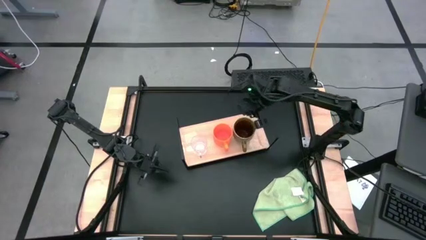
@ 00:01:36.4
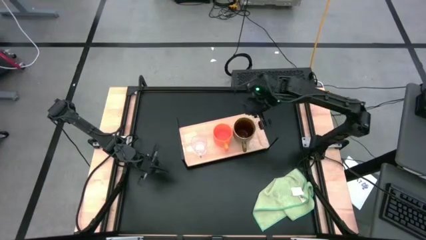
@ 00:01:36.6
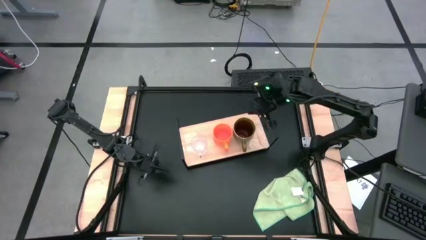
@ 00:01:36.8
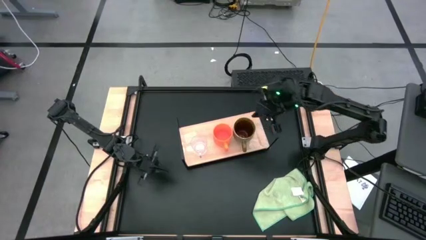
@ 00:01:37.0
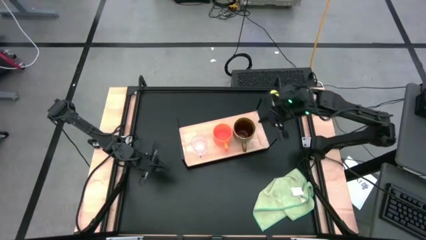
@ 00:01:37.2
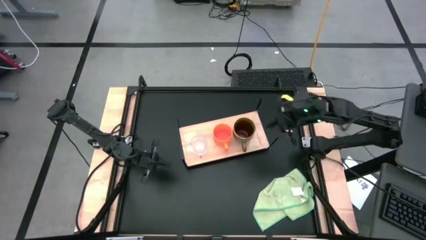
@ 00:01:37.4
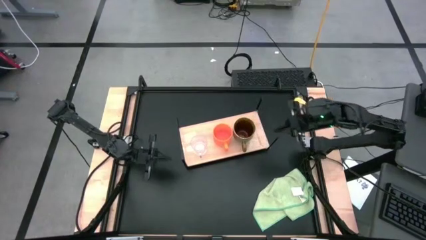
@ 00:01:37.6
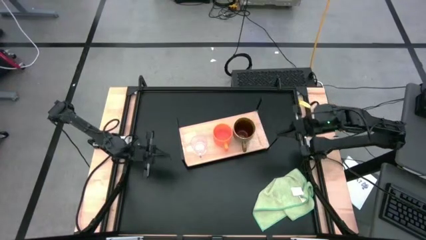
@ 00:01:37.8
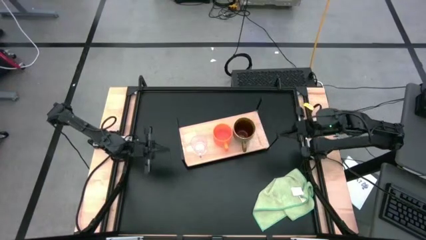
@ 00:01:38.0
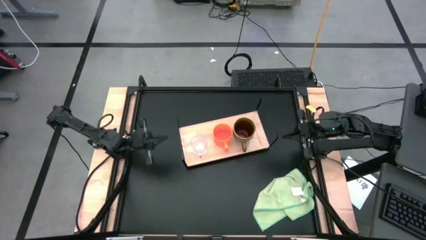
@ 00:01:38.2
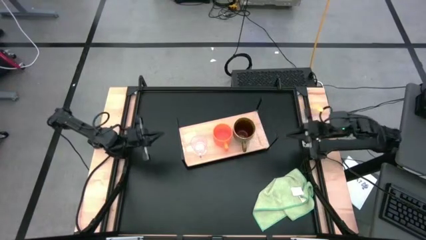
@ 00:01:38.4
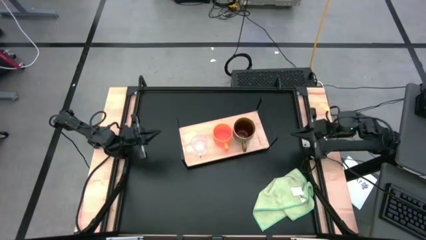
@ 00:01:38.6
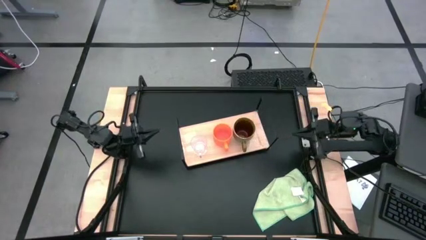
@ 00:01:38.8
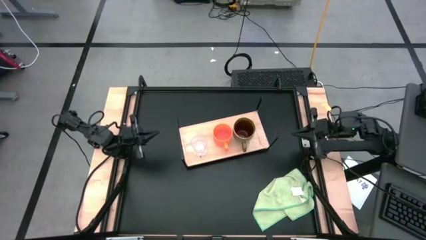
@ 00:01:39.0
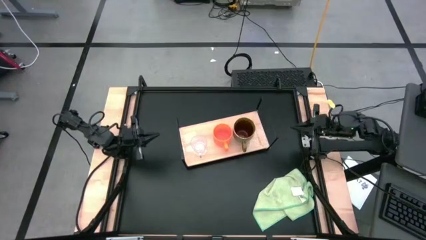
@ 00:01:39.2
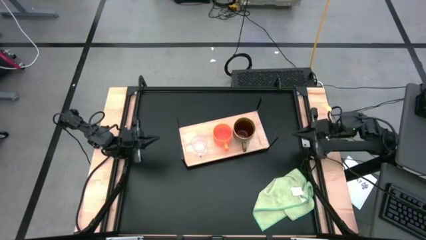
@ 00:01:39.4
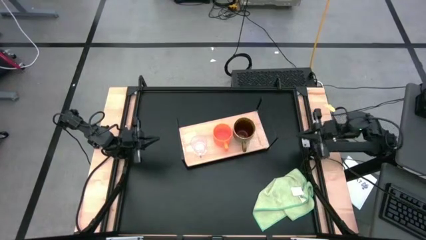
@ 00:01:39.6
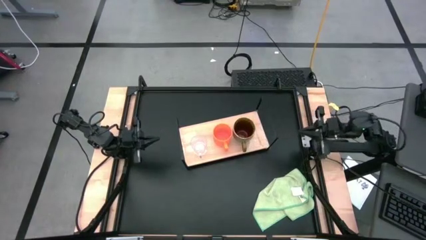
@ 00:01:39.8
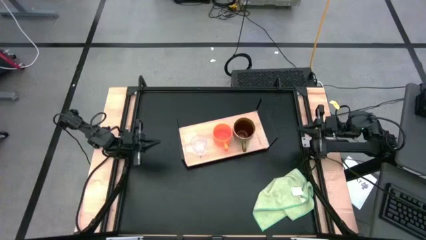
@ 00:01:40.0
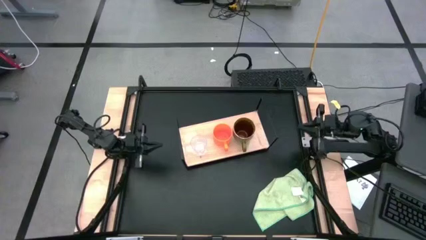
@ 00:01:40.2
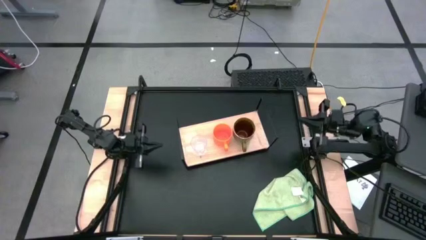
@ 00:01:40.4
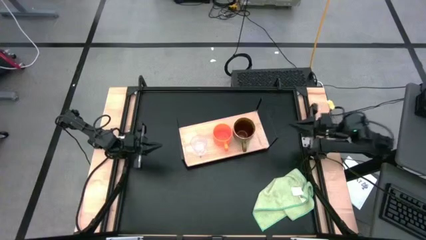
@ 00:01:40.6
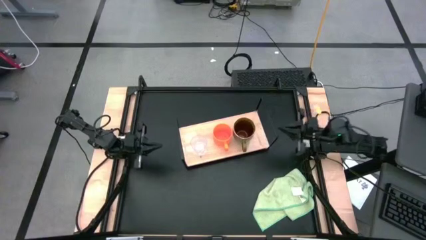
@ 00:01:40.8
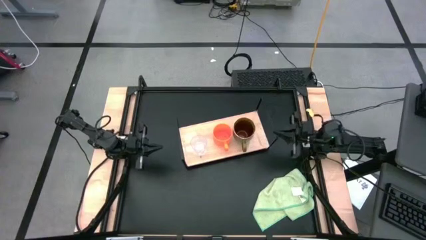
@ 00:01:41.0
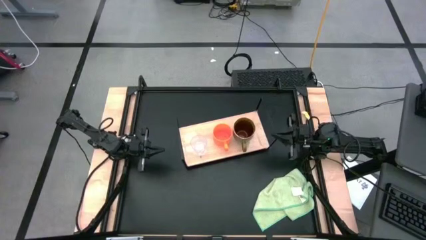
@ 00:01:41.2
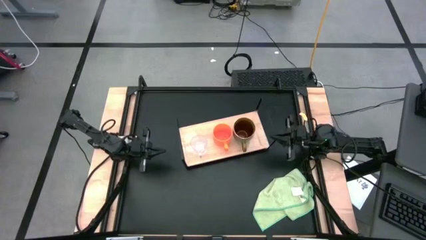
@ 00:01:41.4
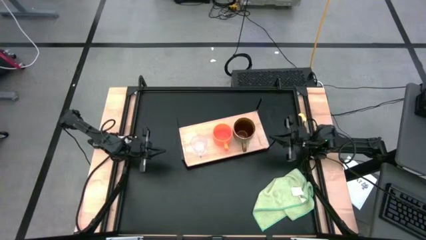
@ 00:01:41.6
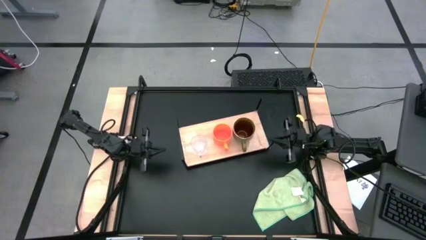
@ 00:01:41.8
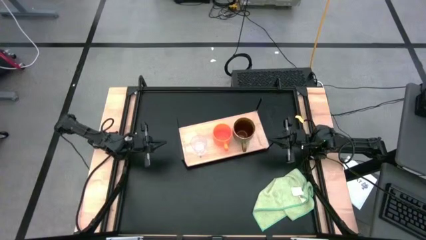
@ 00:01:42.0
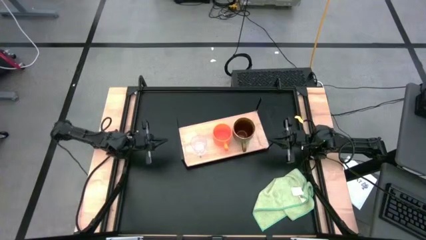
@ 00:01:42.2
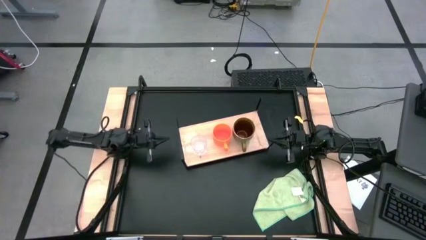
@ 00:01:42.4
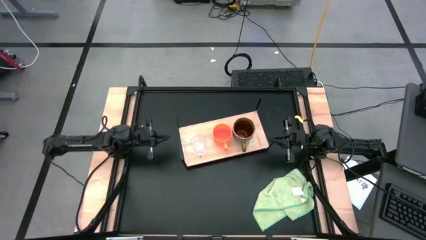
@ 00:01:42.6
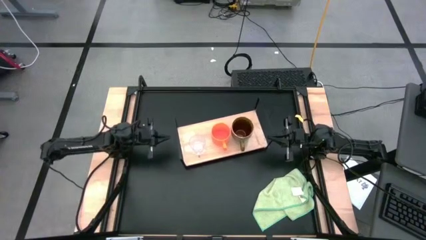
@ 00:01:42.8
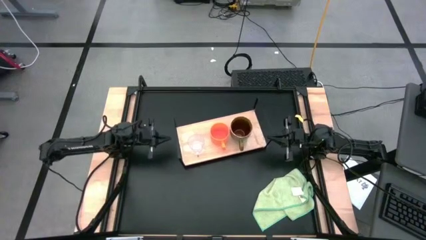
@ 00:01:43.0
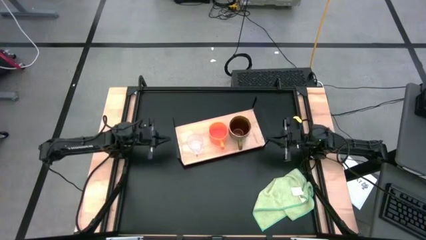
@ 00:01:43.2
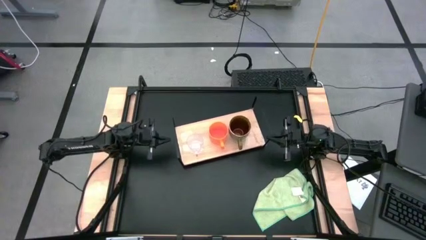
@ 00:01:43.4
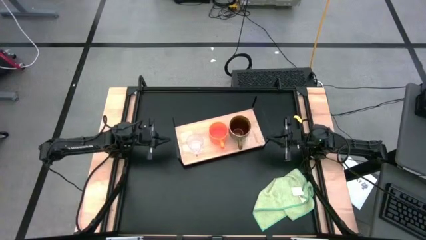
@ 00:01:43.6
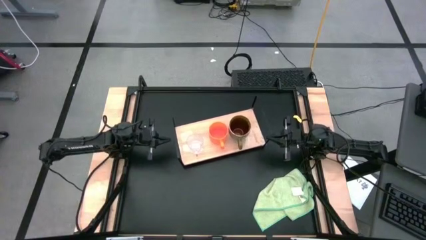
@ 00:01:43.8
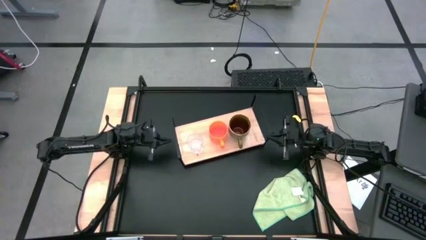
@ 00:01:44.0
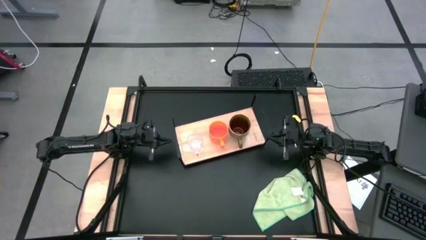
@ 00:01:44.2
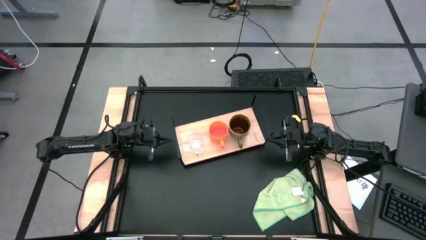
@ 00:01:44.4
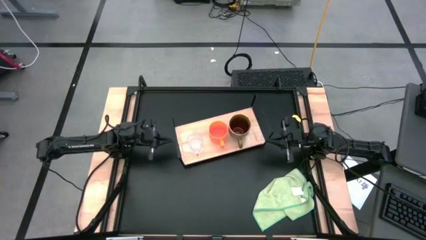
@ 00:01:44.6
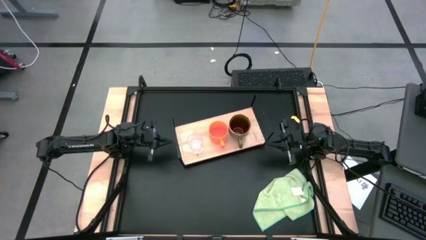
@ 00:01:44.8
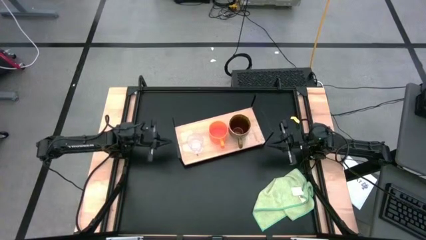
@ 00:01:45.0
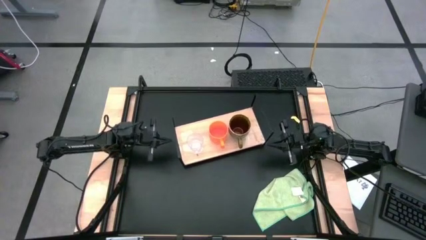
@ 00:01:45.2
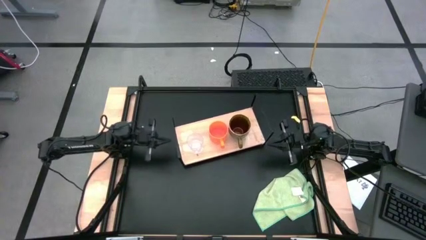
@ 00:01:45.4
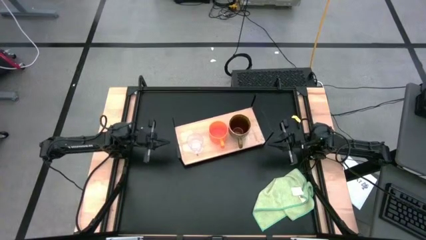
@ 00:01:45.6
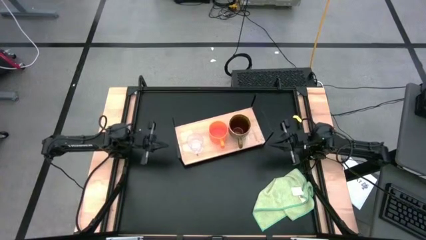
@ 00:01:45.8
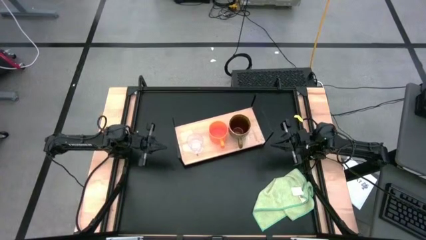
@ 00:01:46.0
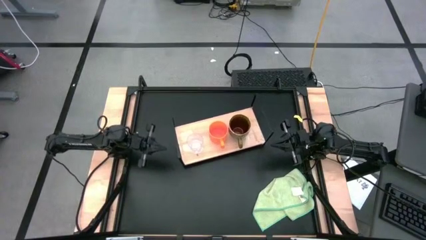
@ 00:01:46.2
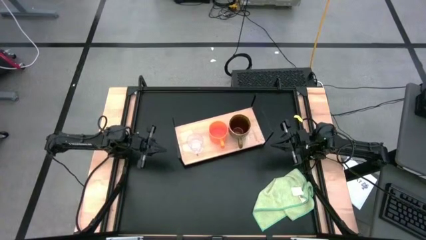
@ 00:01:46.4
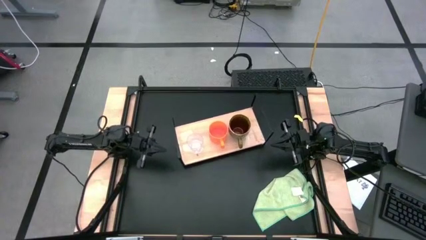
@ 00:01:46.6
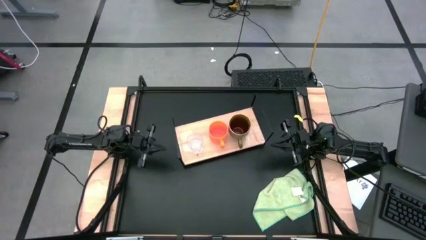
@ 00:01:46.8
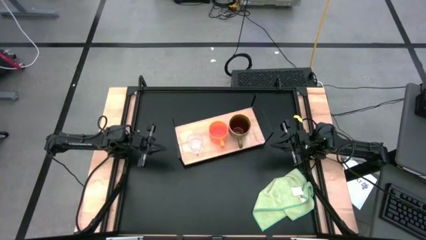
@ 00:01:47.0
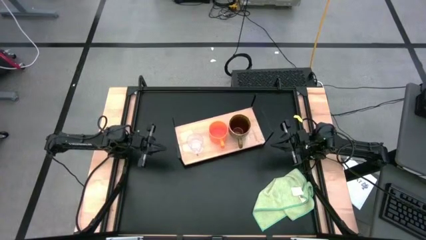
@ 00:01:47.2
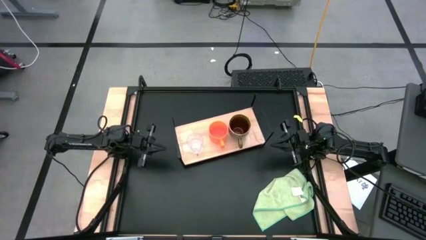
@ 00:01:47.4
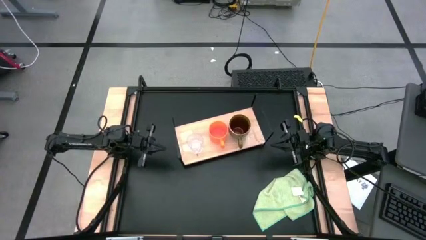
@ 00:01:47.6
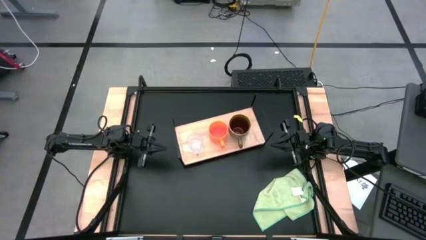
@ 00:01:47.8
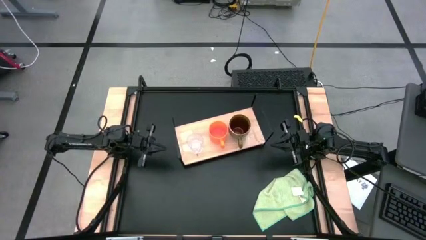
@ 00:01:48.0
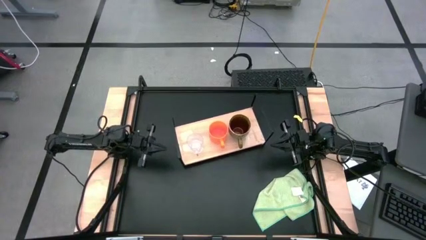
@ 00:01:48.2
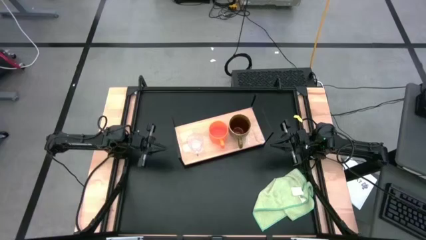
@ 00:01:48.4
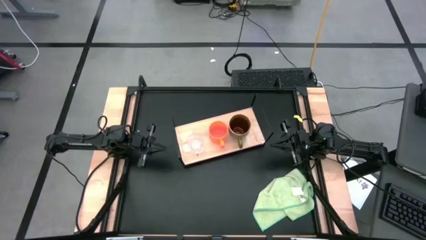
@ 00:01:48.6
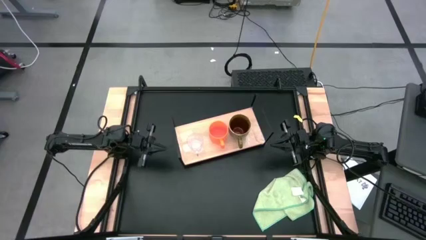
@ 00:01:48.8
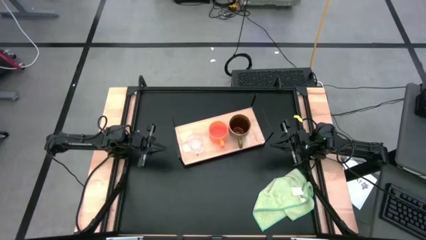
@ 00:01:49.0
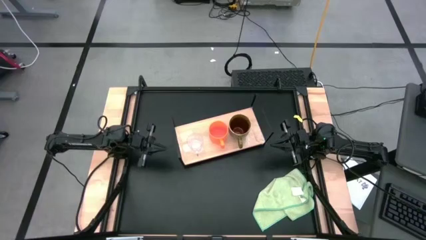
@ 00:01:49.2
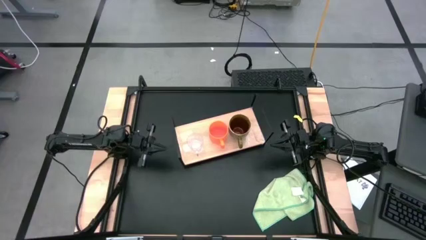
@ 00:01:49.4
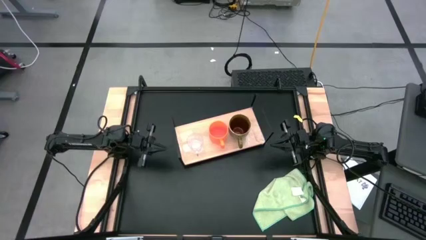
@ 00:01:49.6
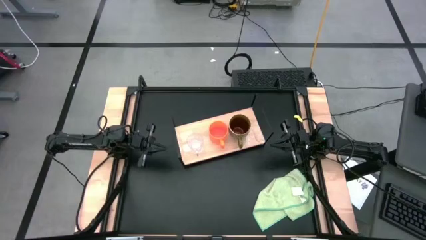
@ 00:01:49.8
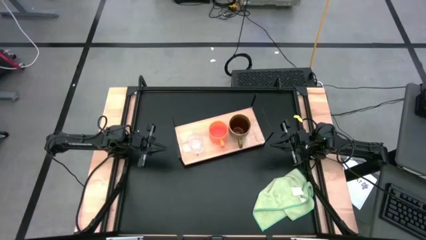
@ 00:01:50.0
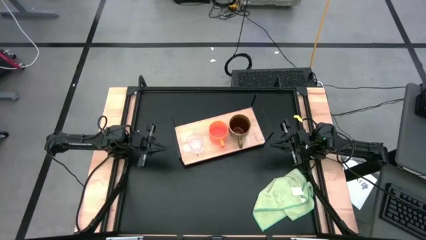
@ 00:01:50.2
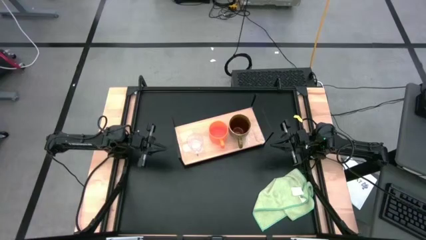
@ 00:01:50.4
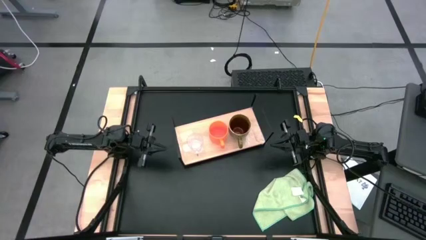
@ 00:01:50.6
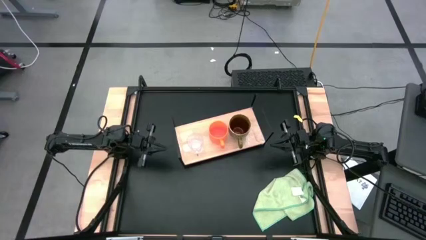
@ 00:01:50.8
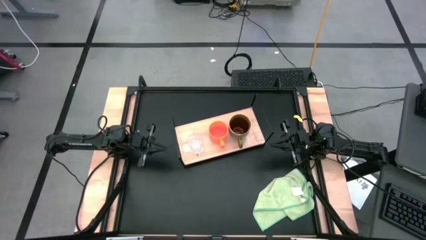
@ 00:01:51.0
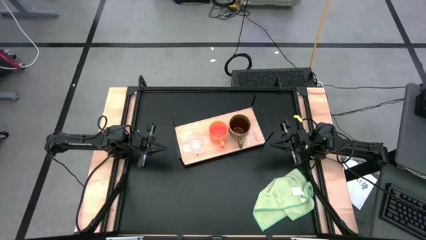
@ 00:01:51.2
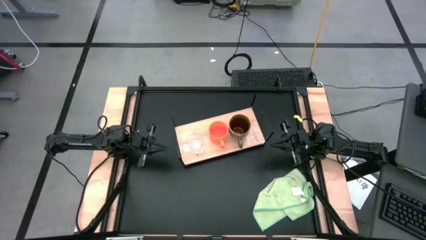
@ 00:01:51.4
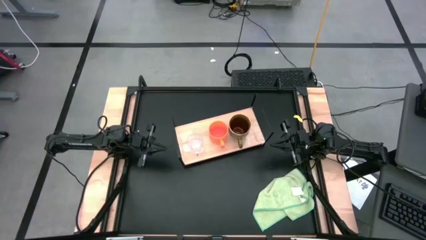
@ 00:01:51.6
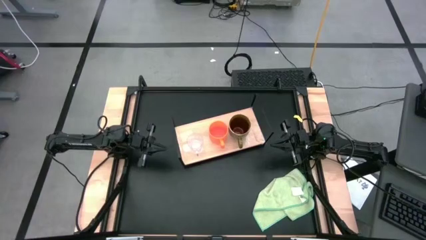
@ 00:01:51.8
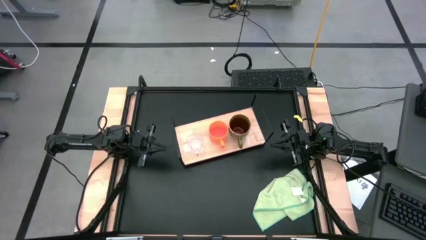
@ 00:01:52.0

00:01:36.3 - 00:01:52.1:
Task: Stack small to large cups/mugs on shelf
Return to Home Position

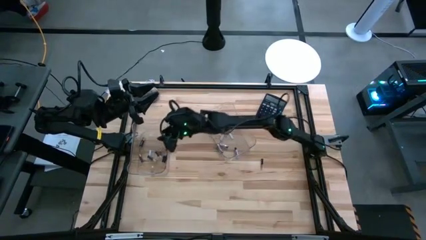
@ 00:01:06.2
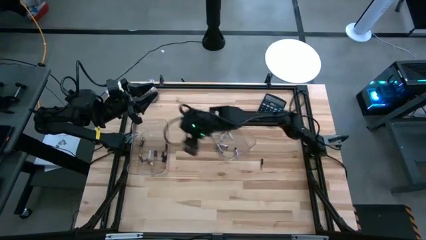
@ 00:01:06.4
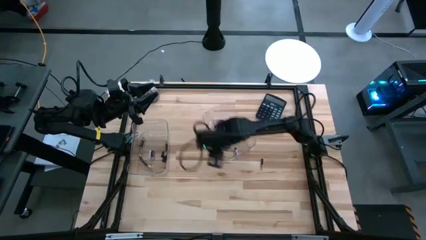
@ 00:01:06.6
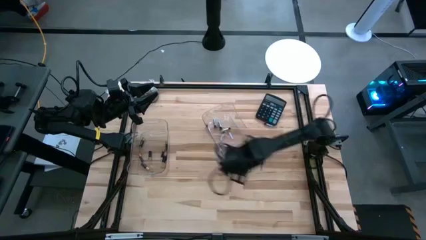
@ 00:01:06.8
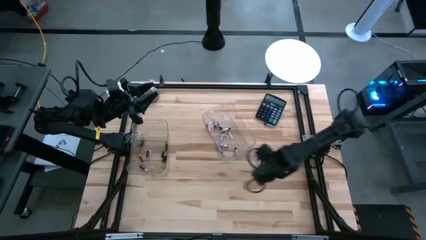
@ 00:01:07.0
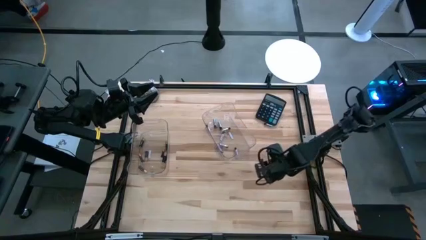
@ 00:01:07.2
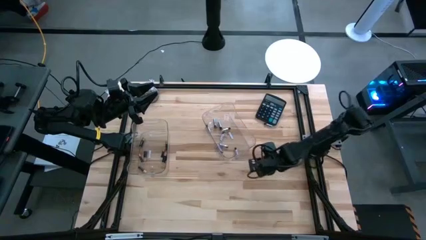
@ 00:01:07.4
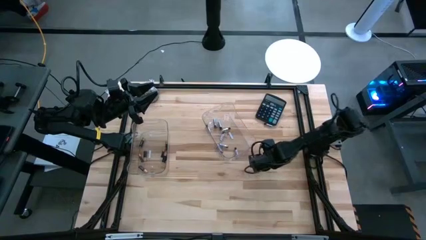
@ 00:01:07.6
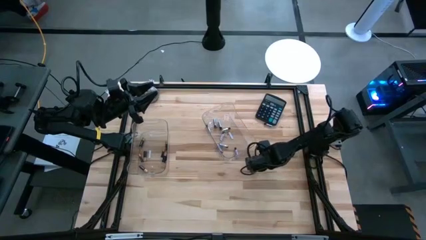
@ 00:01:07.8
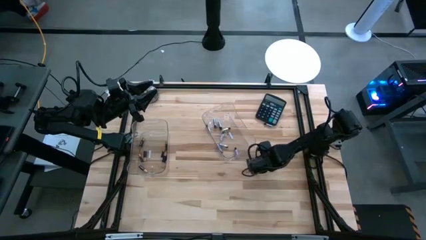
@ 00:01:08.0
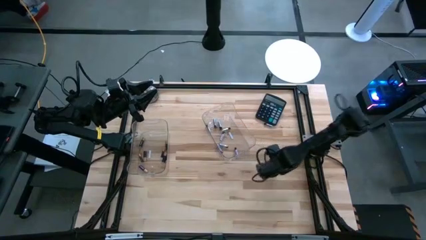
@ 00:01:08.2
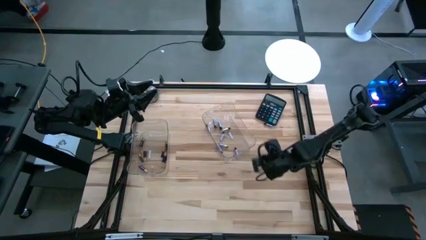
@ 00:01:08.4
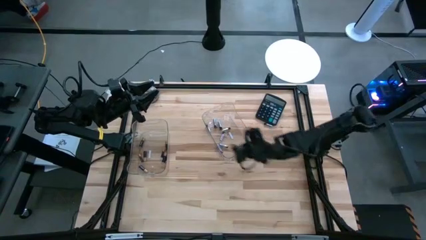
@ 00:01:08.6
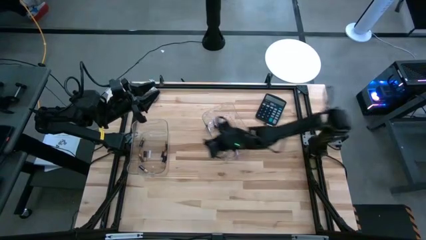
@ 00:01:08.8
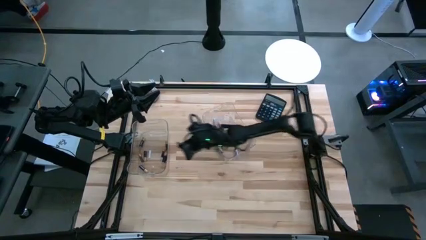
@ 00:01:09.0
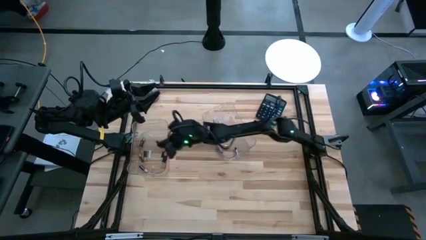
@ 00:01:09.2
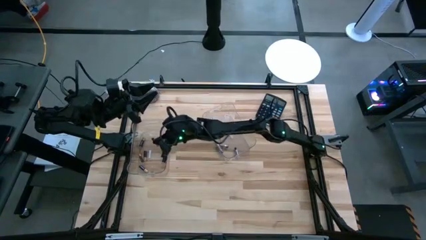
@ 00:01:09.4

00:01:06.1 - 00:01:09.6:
Task: Sort batteries
Put the black battery into the left transparent bin
